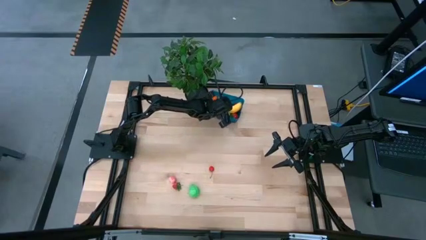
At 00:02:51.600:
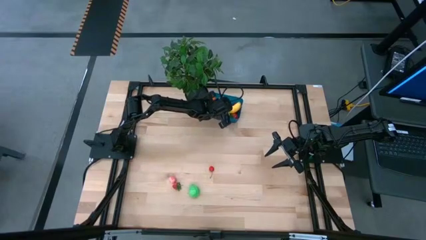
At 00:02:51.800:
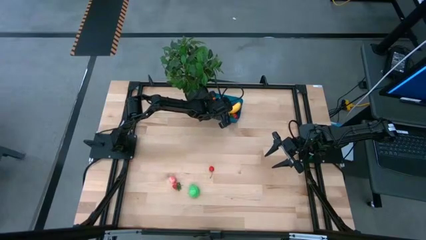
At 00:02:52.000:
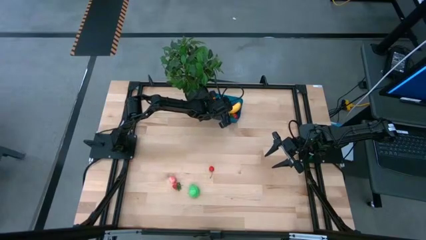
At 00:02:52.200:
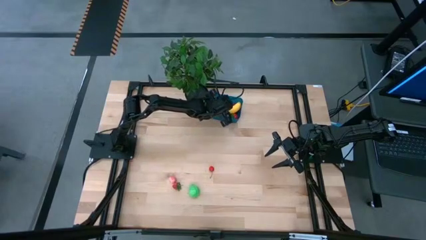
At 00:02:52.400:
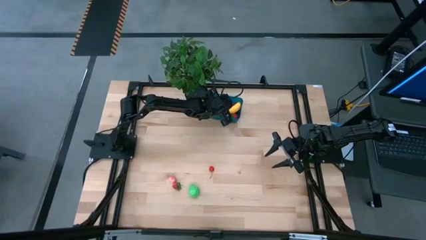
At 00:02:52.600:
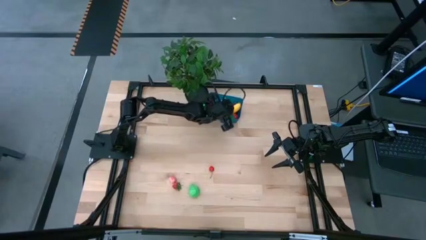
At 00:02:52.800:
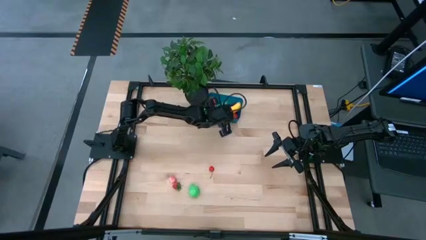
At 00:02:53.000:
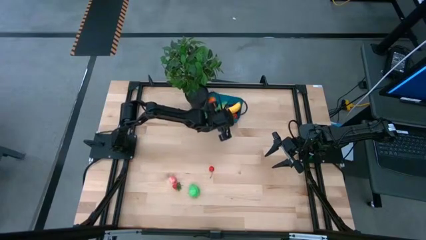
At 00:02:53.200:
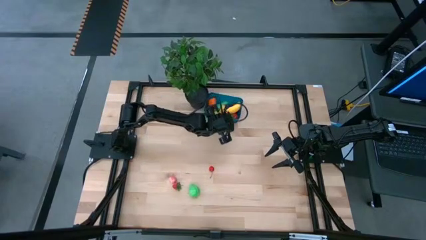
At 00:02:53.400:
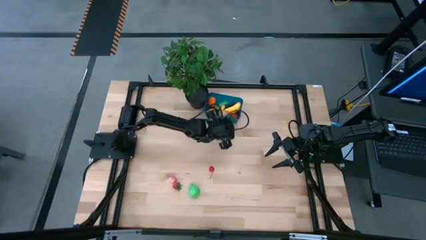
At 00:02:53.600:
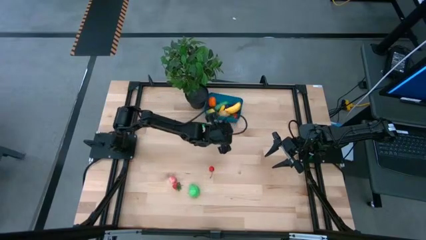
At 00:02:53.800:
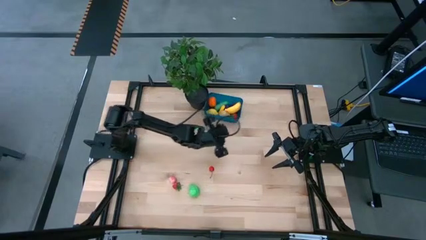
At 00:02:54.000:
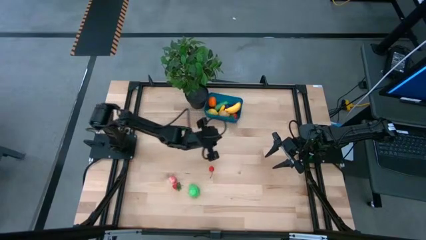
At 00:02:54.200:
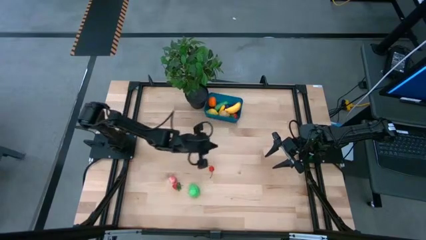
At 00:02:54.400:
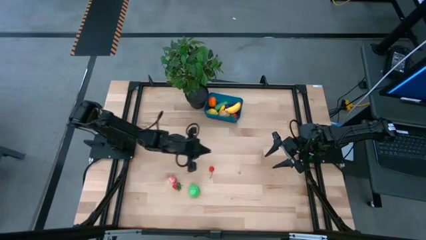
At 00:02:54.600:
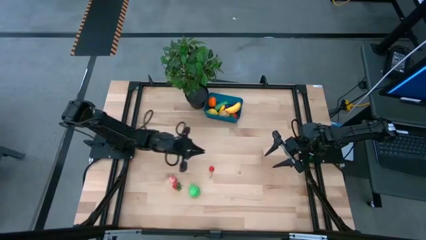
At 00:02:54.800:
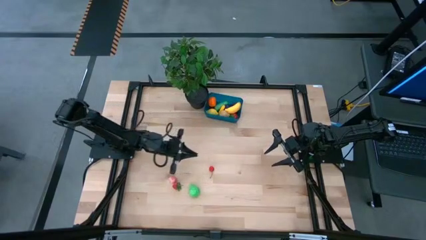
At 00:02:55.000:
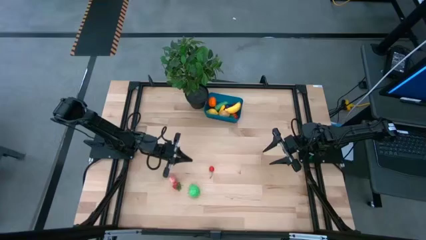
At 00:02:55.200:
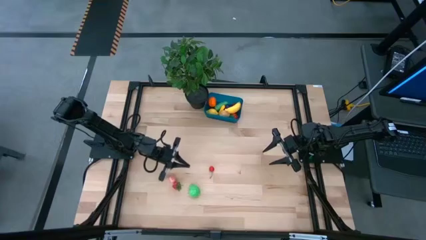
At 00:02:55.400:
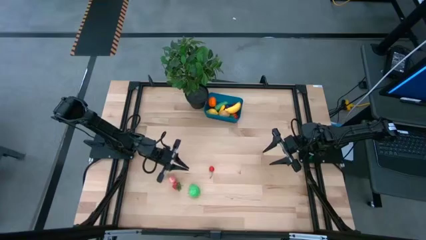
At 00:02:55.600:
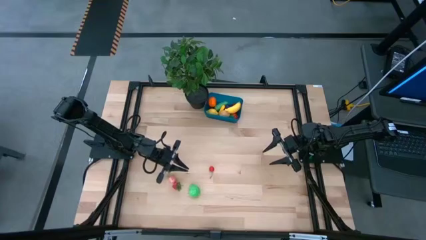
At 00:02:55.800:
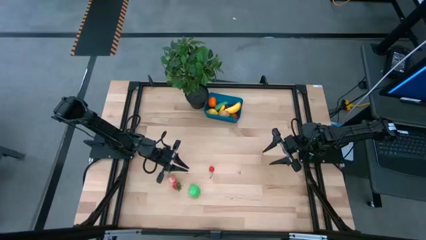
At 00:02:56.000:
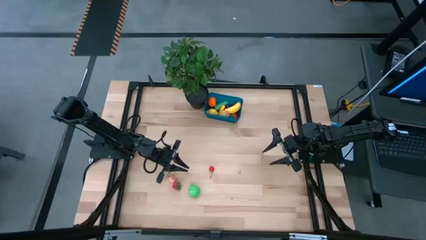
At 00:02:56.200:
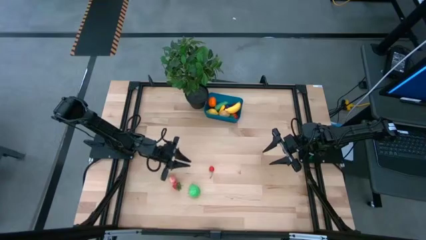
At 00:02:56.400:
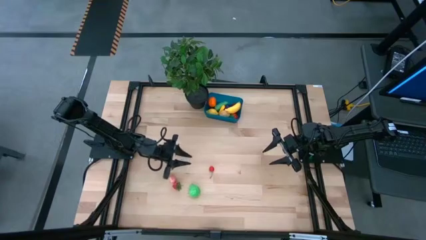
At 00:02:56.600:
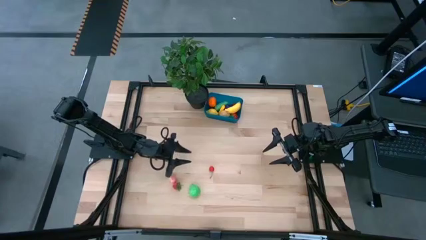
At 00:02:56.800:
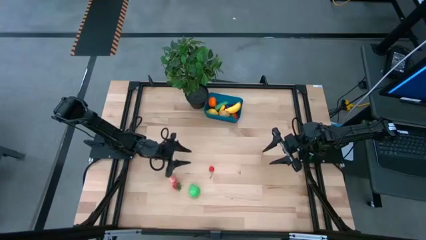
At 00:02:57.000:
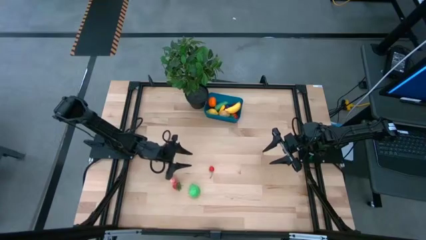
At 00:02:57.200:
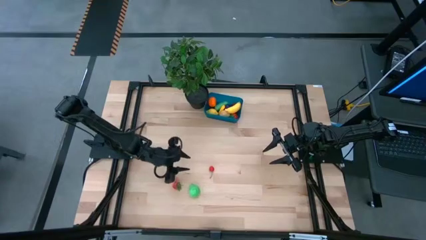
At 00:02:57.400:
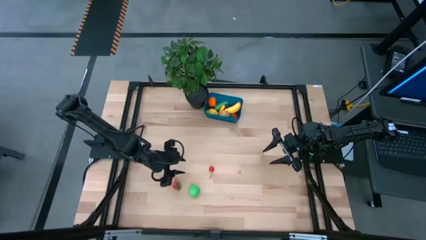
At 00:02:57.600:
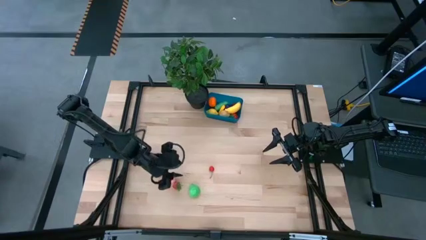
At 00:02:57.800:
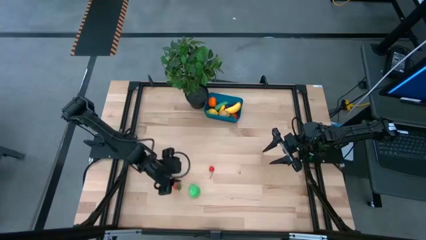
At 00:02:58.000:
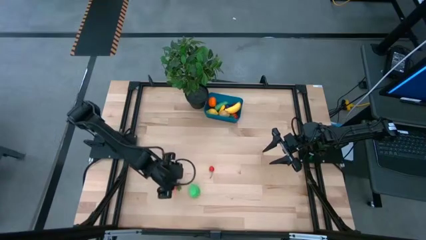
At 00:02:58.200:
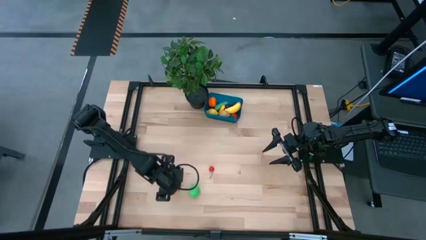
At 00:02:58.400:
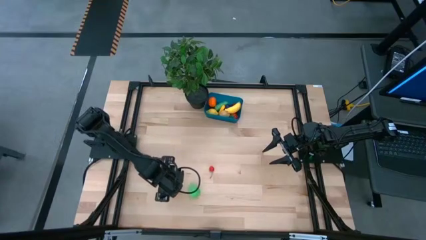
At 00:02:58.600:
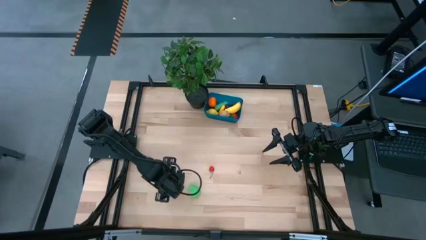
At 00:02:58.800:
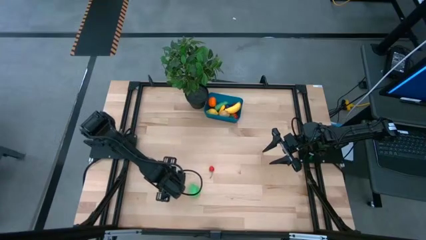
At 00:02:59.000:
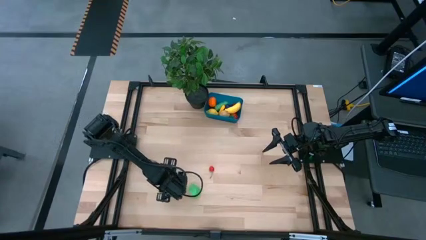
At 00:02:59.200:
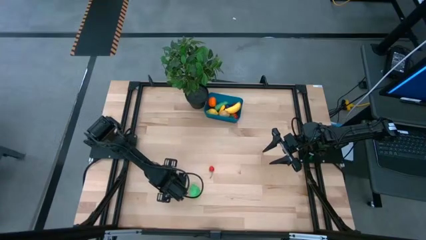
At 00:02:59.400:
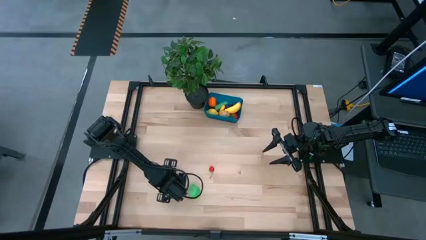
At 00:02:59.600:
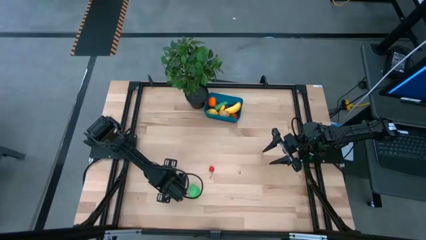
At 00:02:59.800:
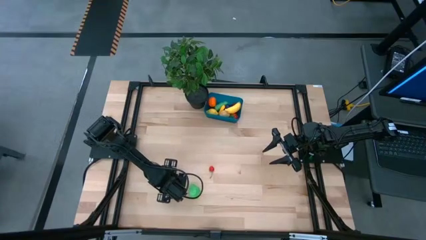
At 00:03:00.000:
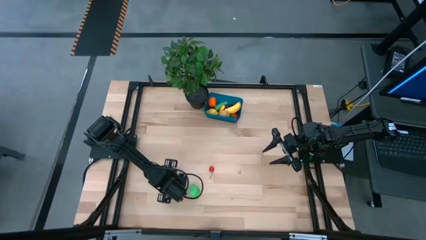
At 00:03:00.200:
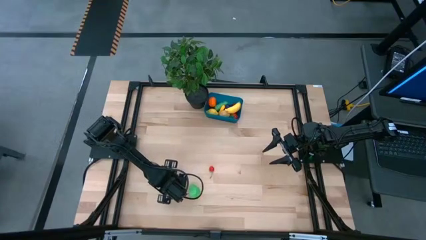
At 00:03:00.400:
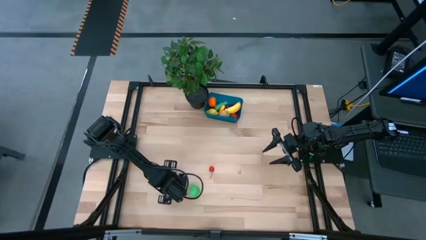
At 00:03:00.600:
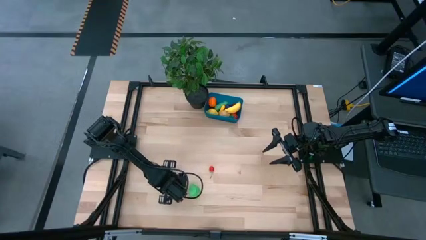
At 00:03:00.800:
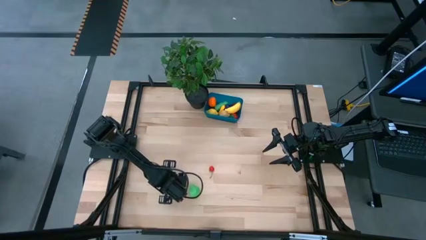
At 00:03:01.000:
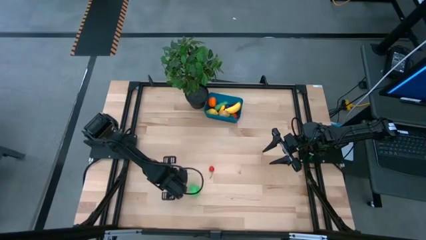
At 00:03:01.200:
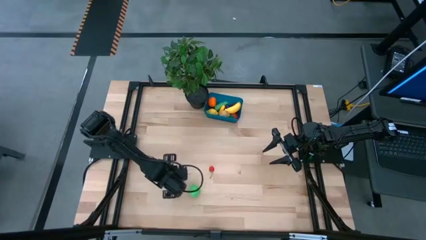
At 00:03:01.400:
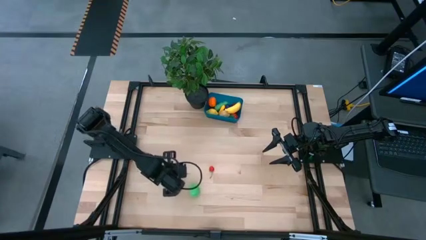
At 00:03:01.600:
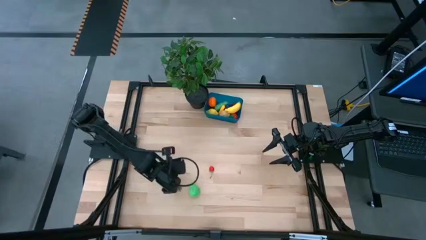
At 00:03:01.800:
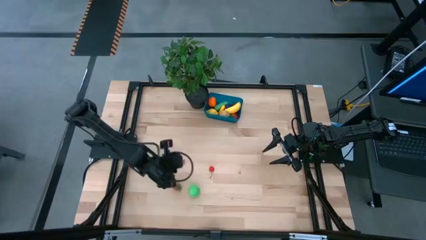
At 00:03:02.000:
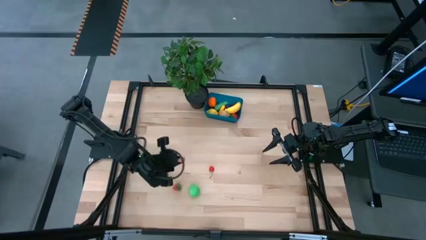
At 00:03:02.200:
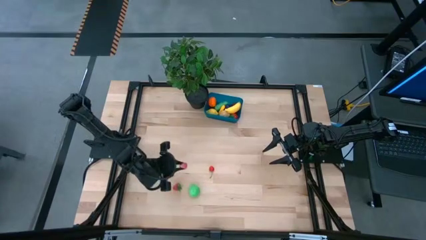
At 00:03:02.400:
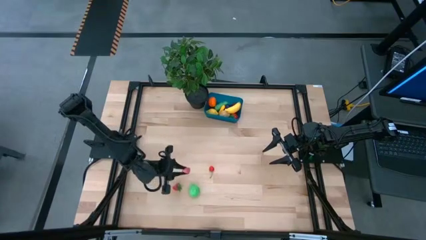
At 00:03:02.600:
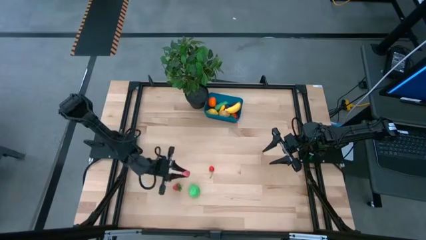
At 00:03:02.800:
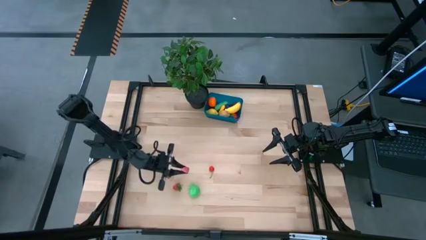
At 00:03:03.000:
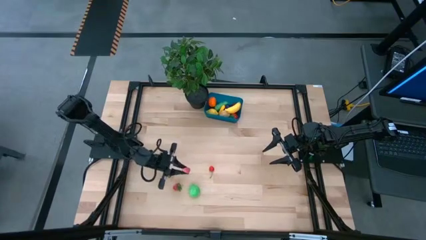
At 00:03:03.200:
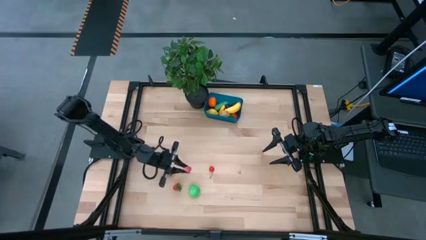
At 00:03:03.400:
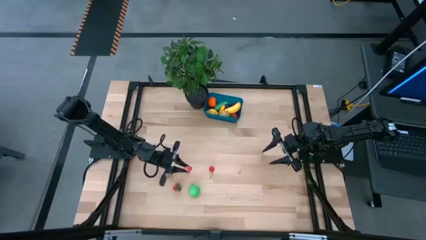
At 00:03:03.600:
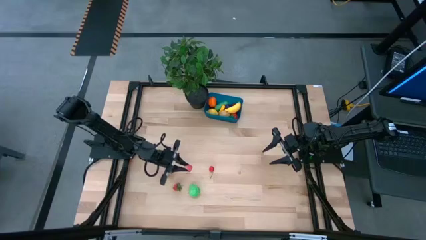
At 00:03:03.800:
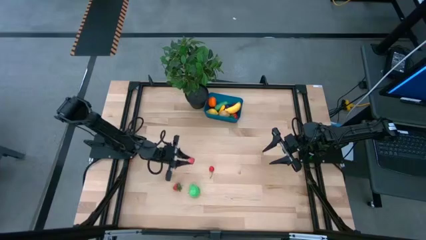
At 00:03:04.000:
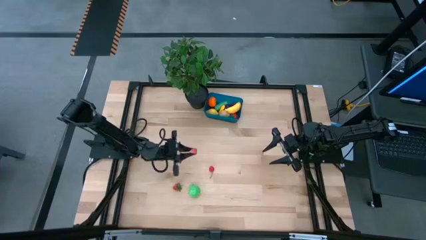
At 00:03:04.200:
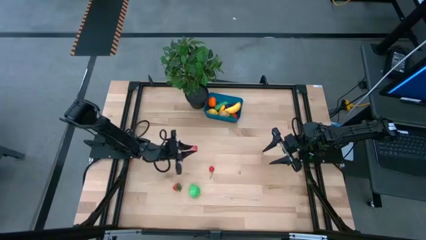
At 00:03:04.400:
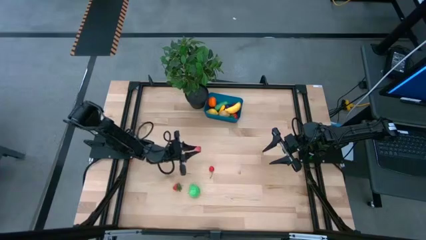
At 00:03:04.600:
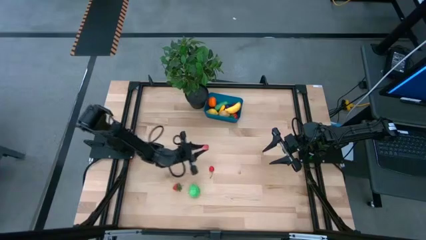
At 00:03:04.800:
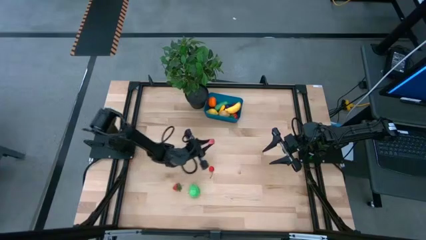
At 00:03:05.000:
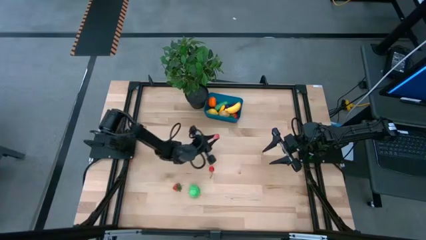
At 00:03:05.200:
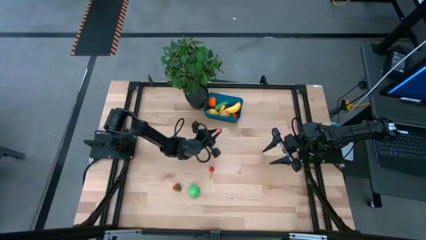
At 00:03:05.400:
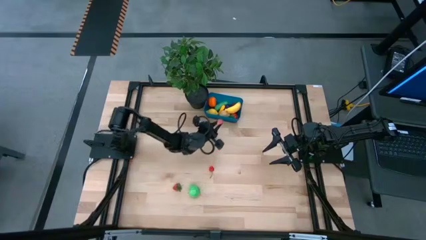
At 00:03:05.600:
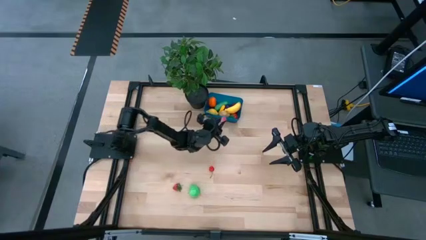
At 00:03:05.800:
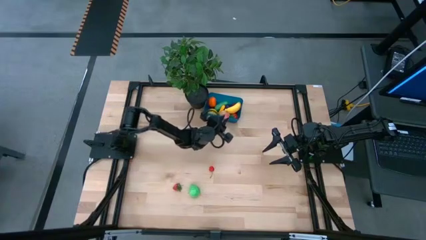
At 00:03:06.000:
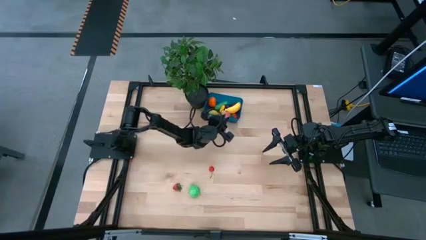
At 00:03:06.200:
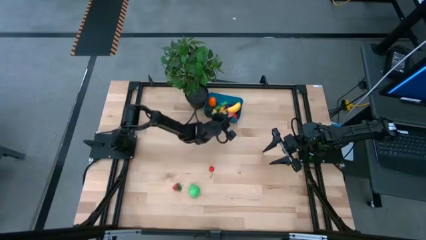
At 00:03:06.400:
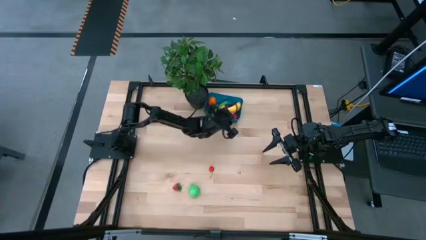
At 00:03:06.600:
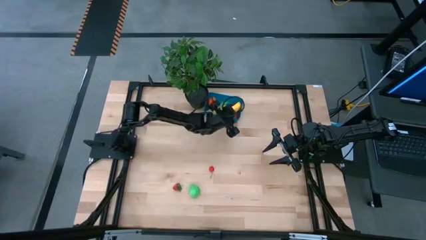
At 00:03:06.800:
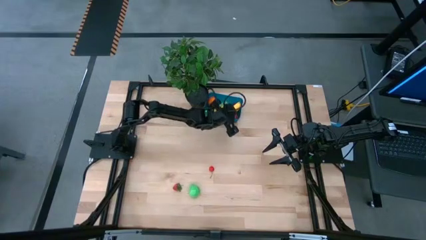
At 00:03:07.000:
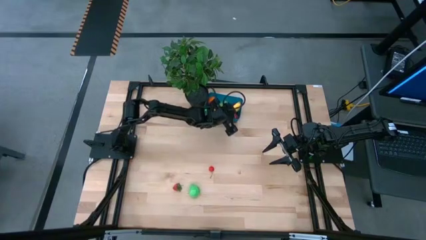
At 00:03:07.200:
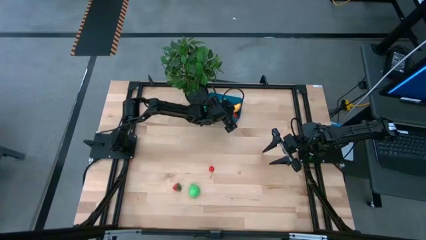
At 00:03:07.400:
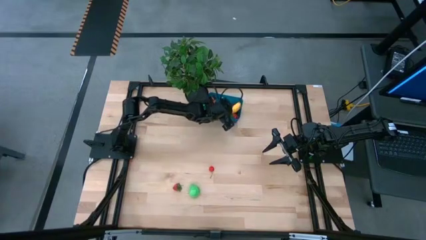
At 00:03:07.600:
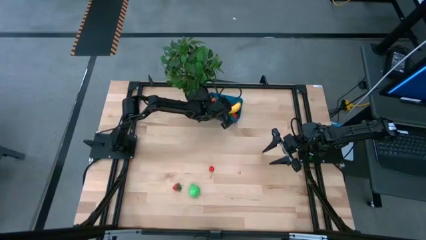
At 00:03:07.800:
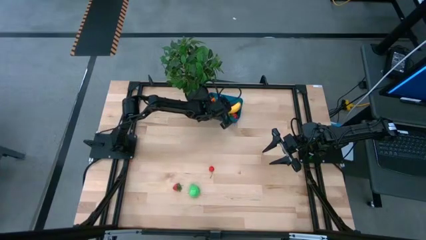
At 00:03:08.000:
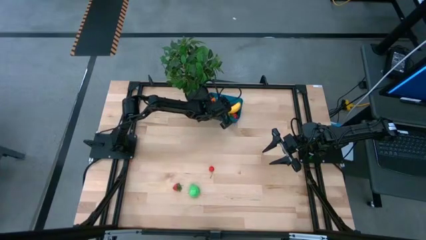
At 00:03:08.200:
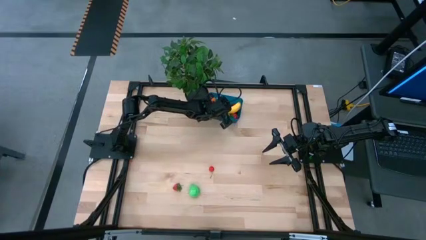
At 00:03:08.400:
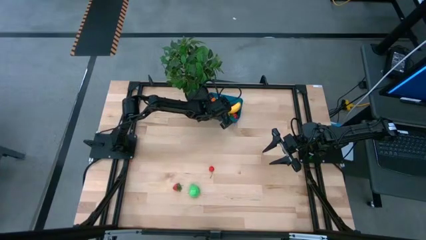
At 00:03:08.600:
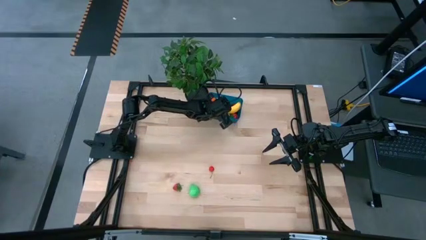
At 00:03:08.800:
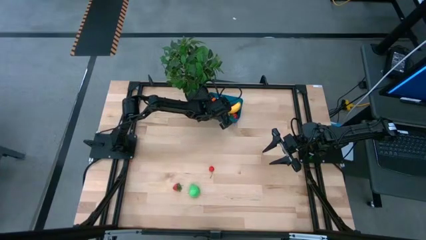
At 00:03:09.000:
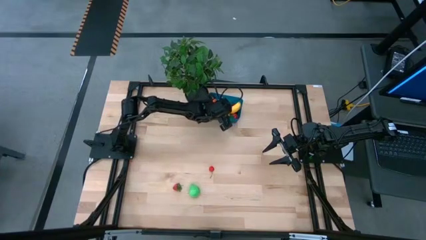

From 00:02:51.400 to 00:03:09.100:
Task: Pick and placing Produce into tupperware
Put the pink peach into the blue container
